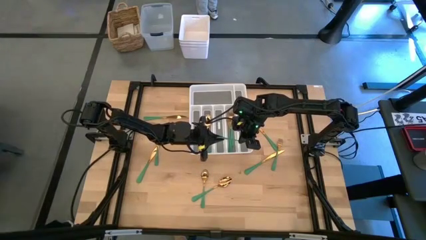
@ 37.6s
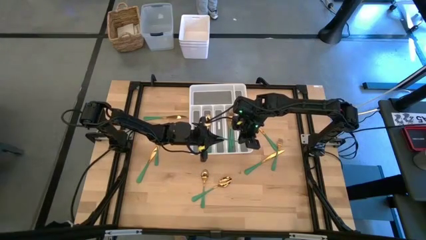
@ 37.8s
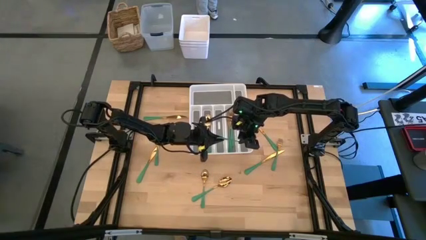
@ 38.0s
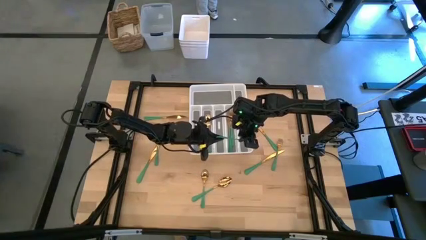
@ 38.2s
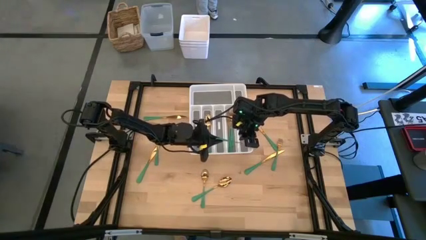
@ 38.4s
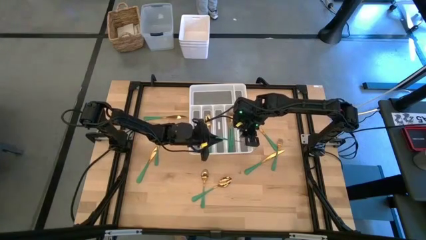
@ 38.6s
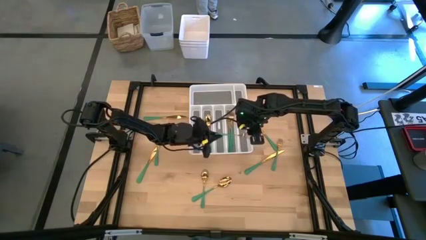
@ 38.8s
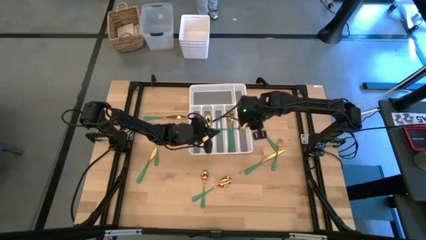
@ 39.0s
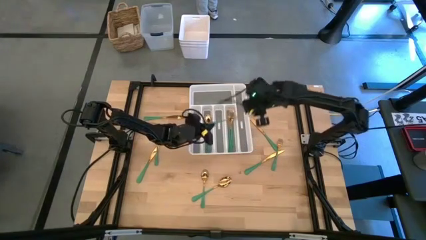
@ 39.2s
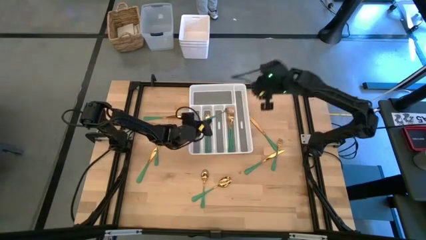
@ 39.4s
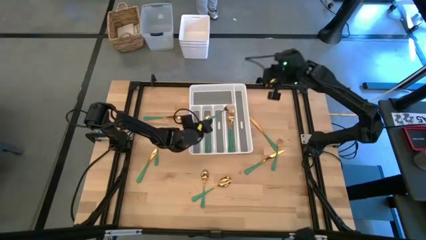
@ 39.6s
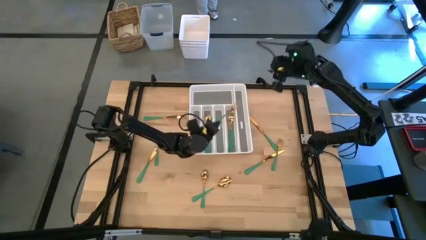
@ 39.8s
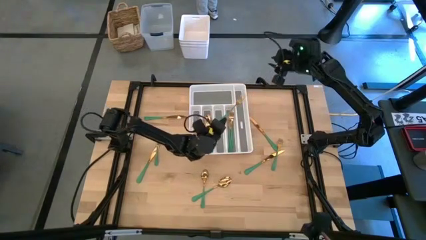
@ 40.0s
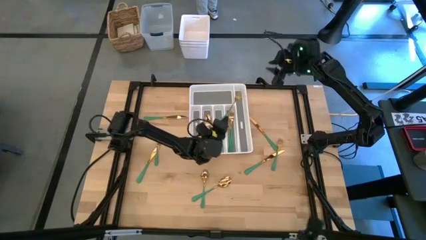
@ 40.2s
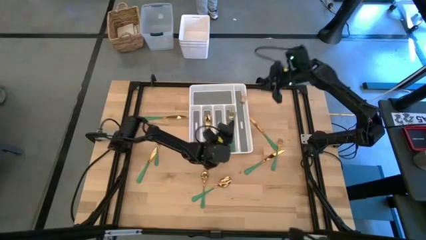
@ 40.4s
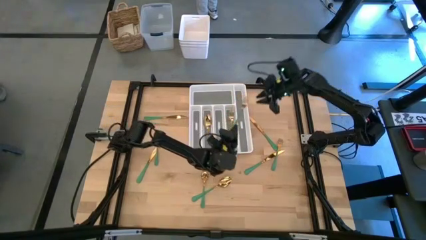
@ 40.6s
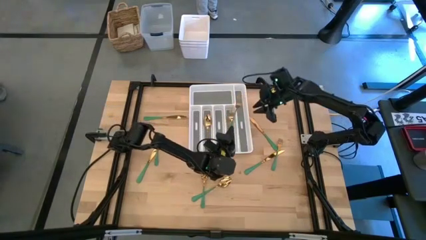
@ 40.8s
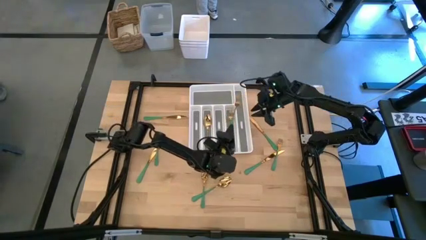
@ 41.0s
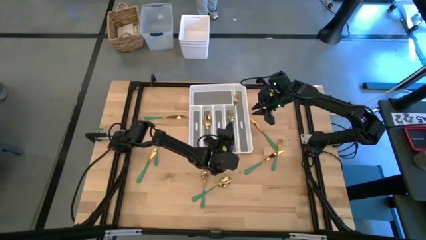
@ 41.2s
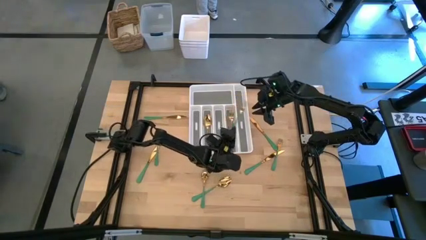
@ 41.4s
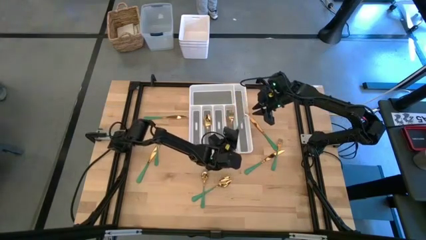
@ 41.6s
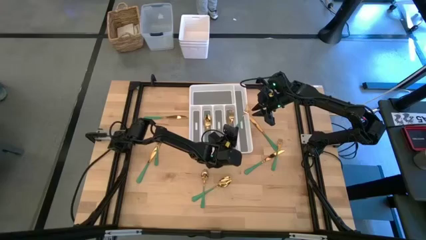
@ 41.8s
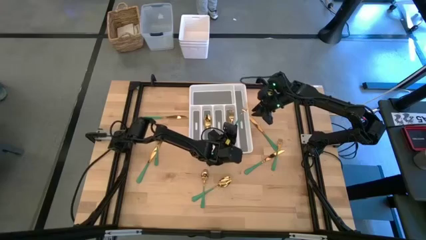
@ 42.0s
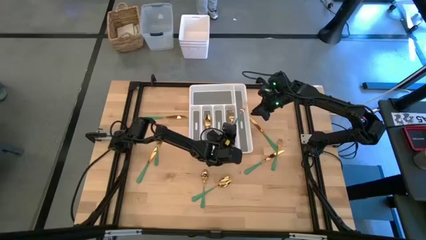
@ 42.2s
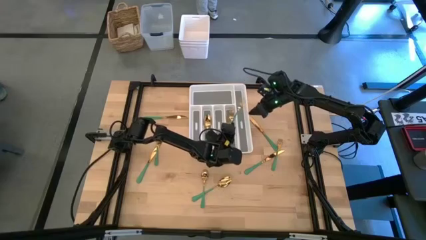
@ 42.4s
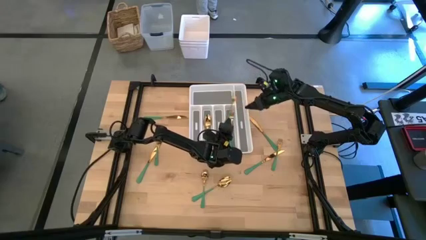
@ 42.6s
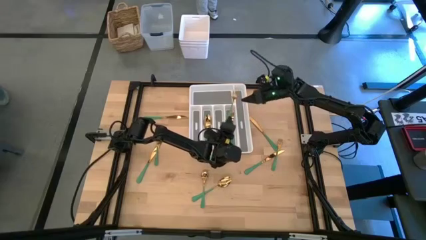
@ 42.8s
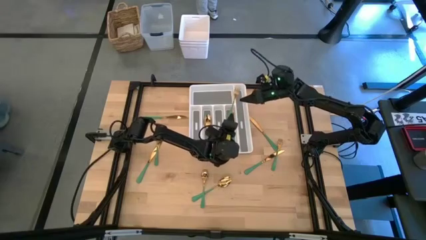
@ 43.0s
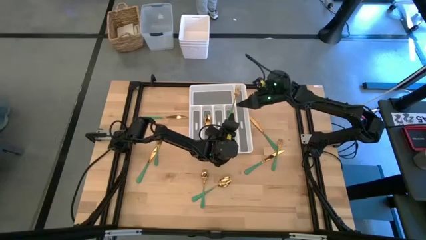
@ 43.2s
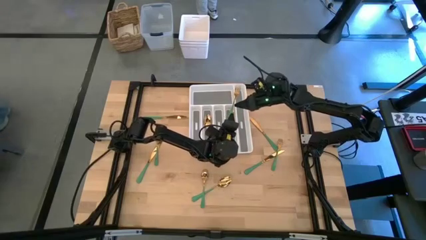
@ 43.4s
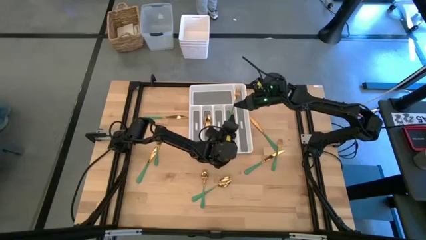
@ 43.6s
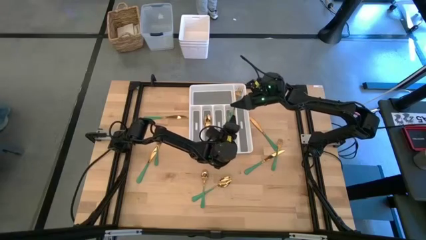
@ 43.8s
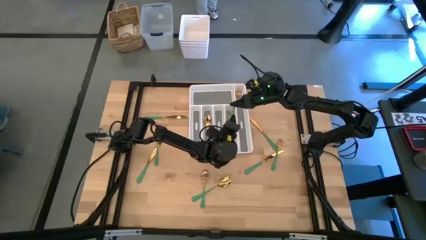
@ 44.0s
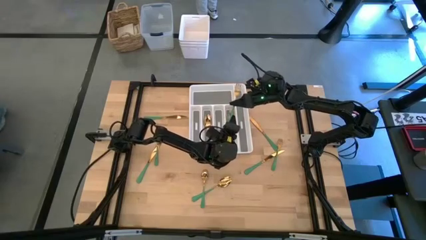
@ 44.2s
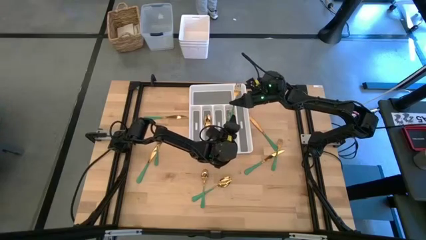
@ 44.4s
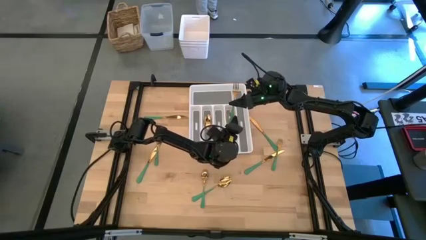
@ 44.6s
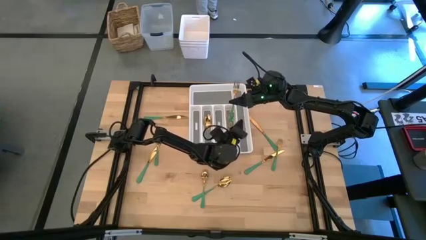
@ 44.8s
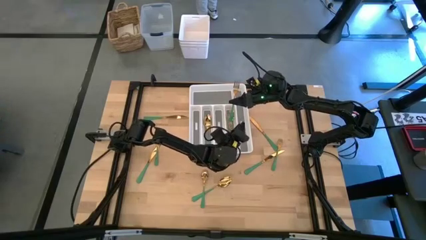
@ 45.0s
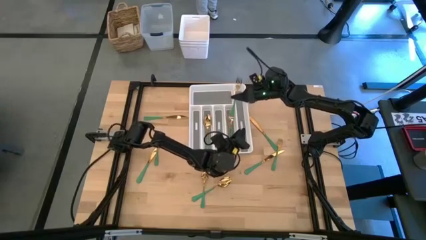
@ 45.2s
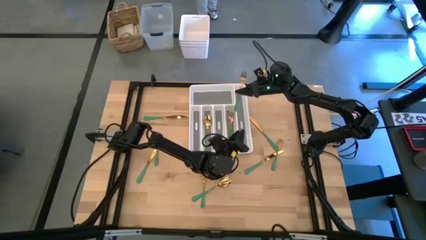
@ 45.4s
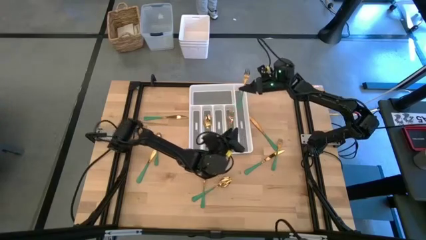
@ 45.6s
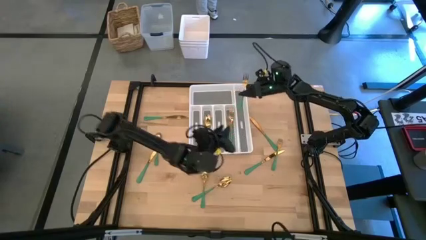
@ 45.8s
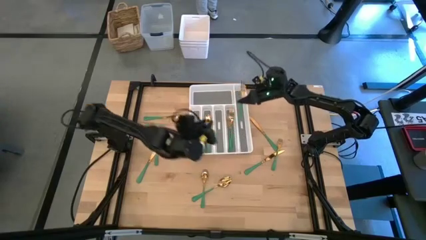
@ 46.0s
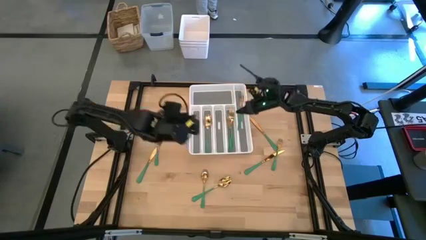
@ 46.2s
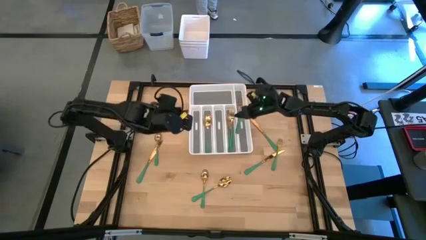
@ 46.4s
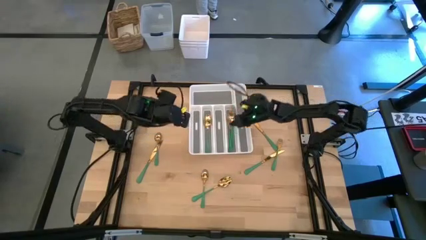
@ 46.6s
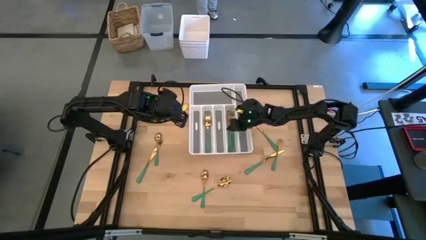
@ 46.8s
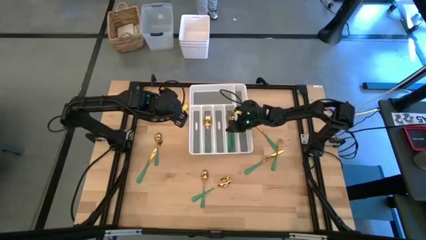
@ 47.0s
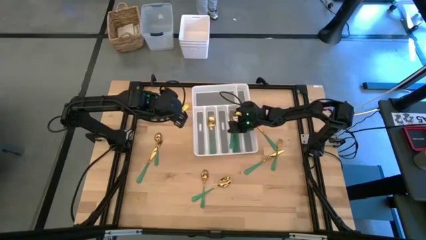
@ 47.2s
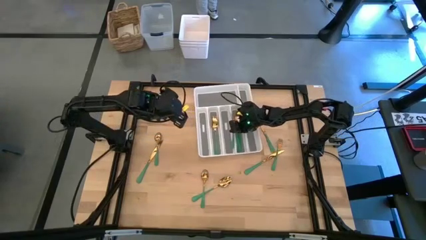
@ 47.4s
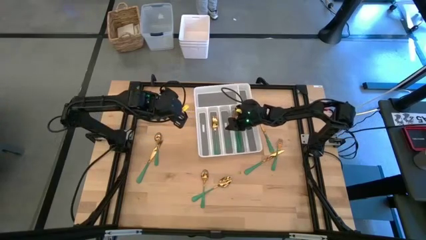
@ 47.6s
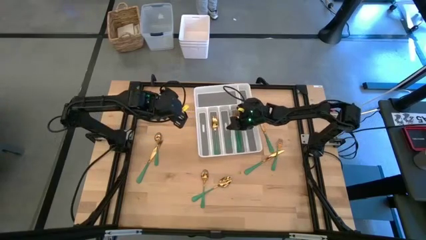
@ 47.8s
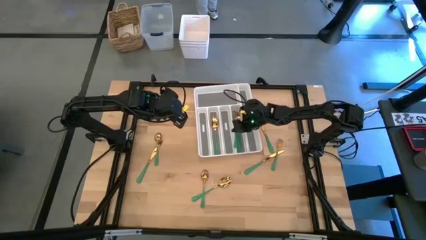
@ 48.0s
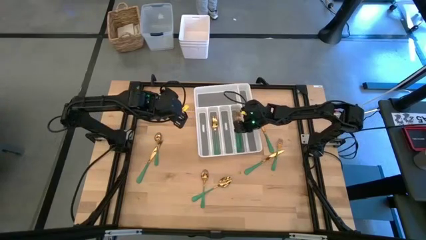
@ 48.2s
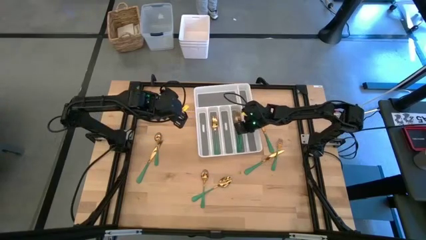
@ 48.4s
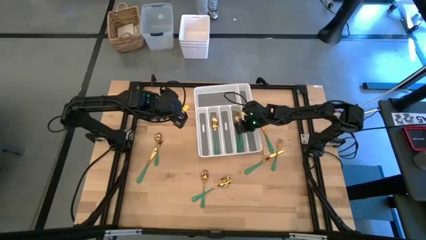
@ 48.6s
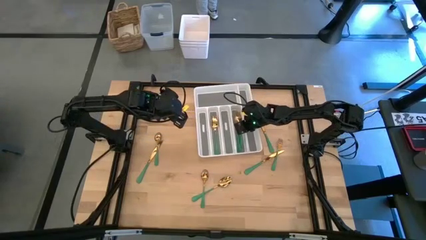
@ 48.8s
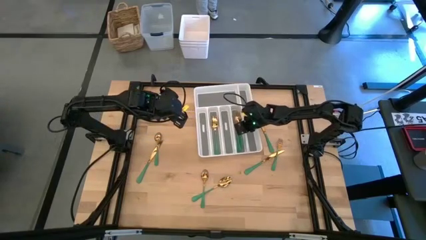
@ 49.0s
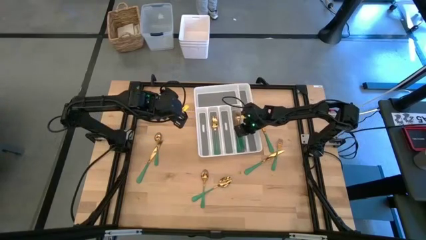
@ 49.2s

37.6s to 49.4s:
Task: Sort silverware
Put the top fork into the silverware organizer

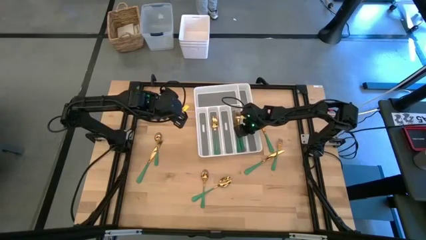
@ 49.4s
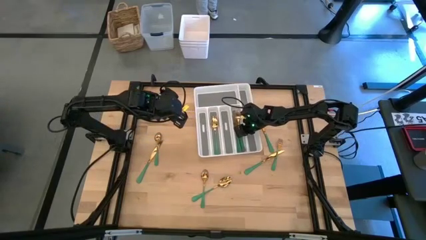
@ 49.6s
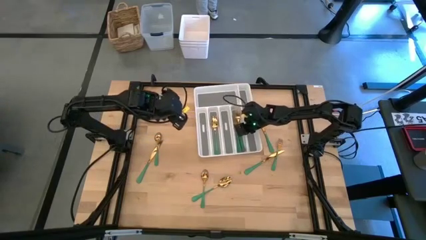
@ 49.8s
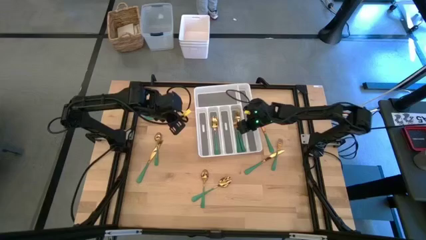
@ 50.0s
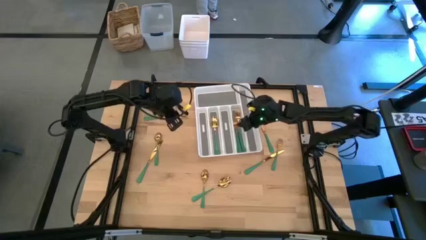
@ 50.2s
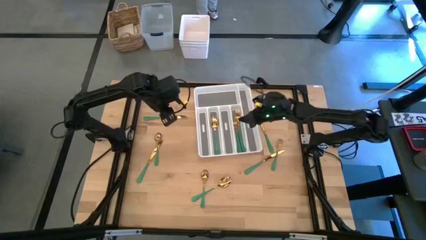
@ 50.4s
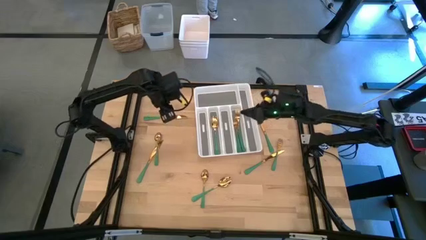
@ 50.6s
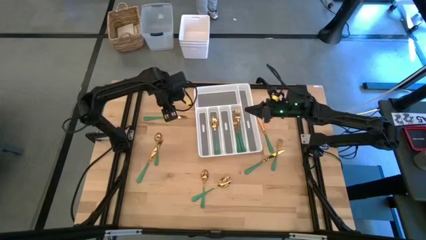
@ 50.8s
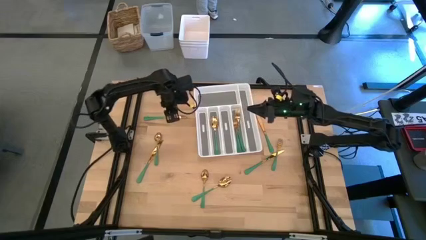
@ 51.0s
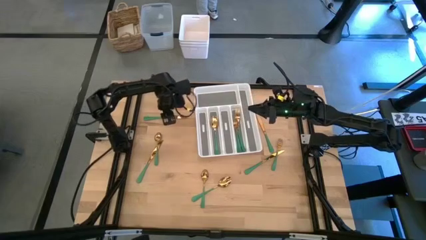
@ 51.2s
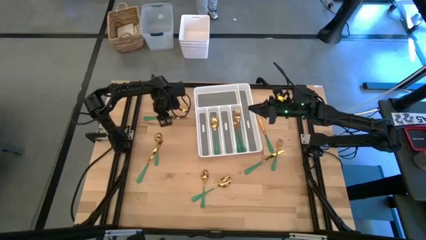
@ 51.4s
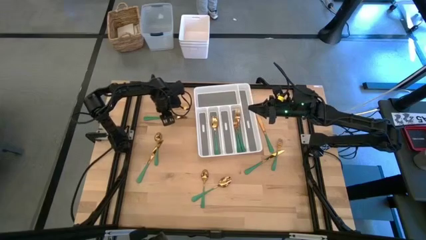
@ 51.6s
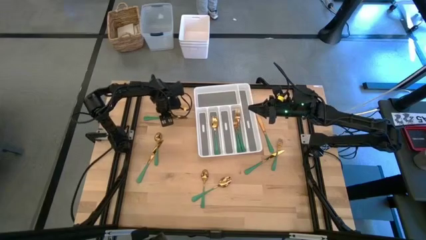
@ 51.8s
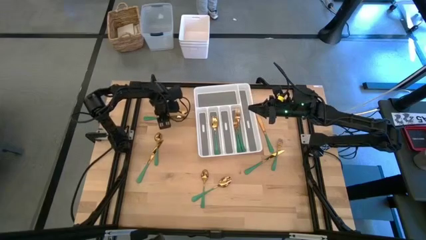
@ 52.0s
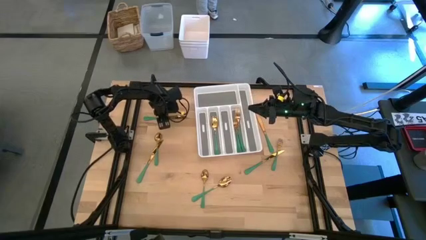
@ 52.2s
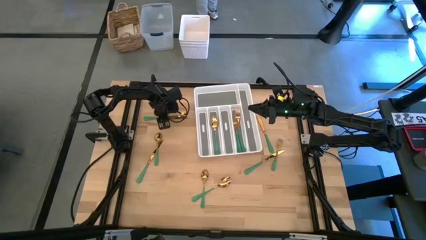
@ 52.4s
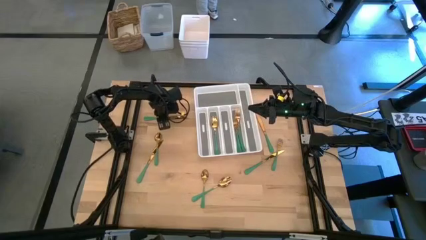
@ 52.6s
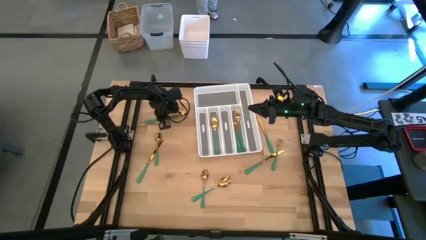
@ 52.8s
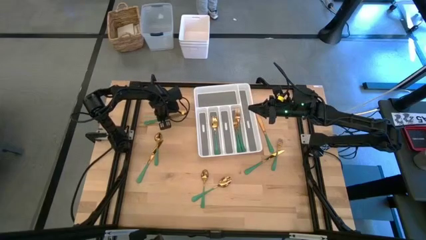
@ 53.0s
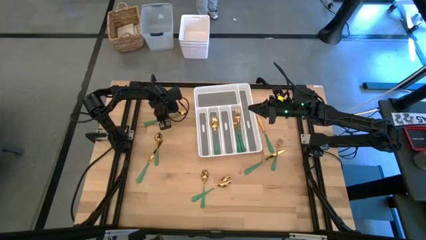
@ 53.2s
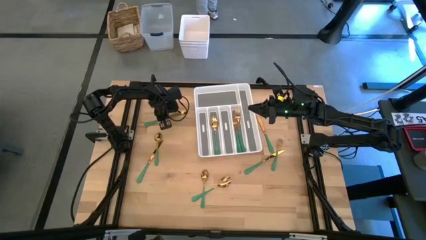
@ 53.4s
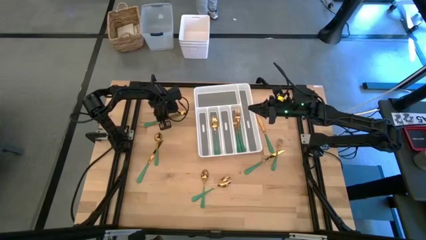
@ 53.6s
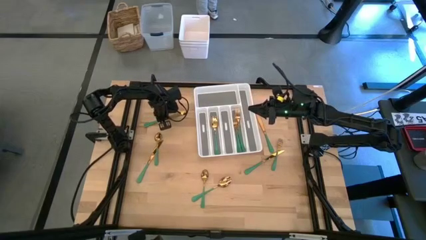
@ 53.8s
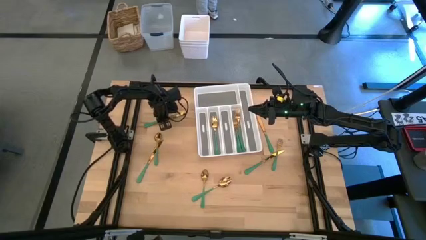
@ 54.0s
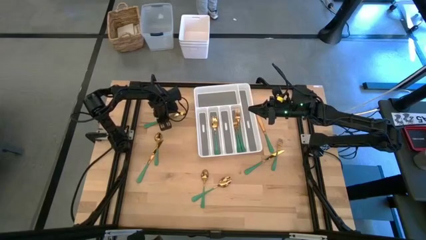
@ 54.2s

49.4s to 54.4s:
Put the top left knife into the silverware organizer

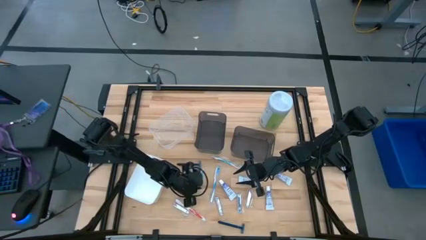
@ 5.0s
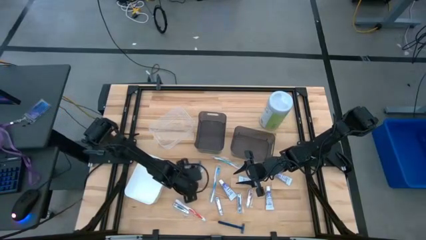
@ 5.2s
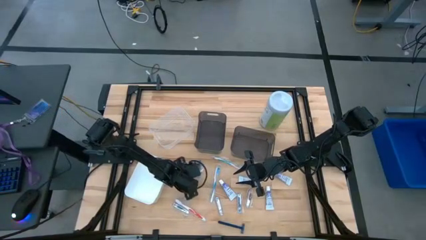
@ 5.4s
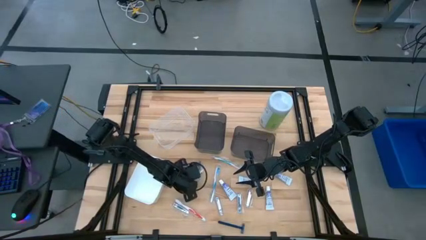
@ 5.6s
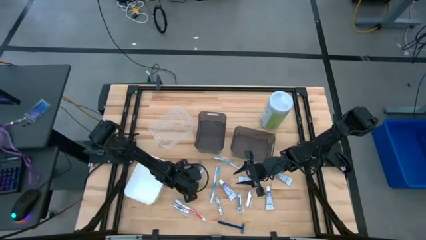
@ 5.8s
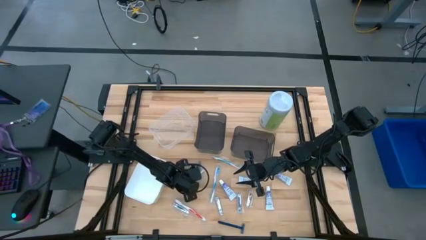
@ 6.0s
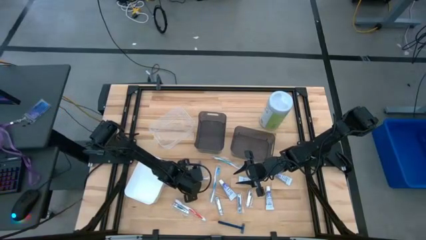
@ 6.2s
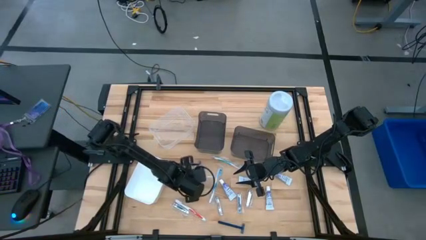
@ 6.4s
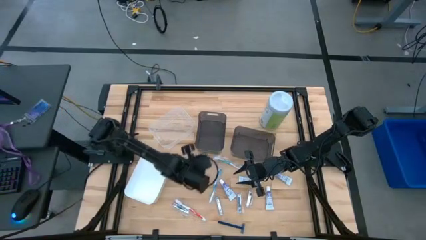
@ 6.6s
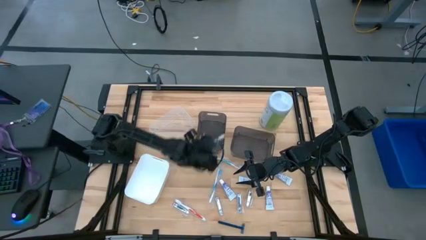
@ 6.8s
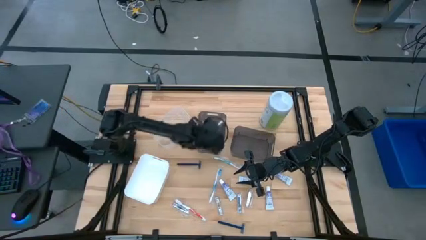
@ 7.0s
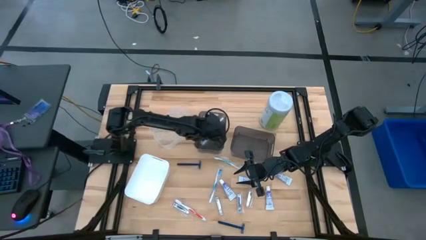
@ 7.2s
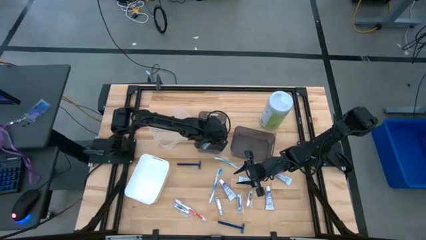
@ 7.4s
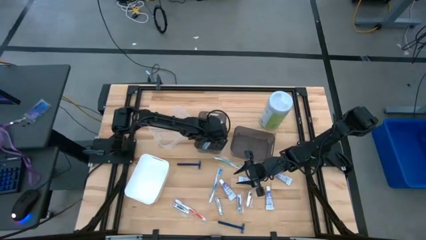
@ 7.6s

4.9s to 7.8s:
Task: Pick & Place Travel size toiletries
Put the blue toothbrush into the left black bin
